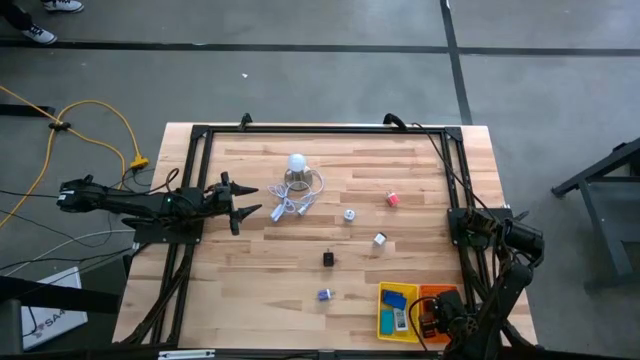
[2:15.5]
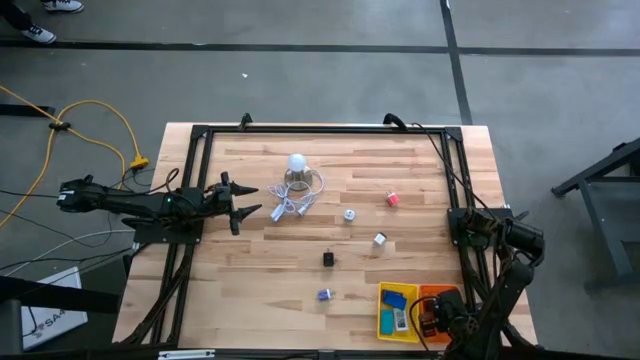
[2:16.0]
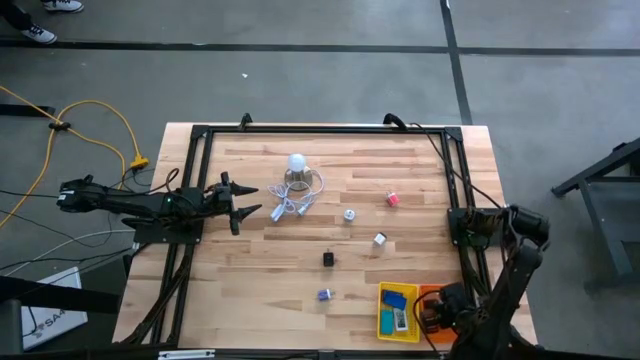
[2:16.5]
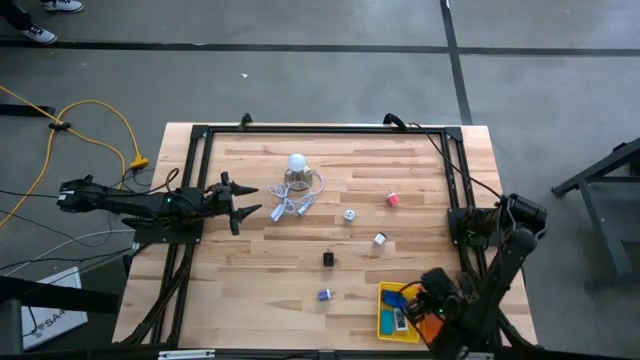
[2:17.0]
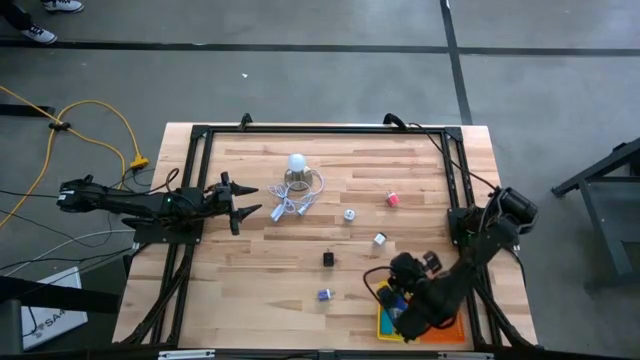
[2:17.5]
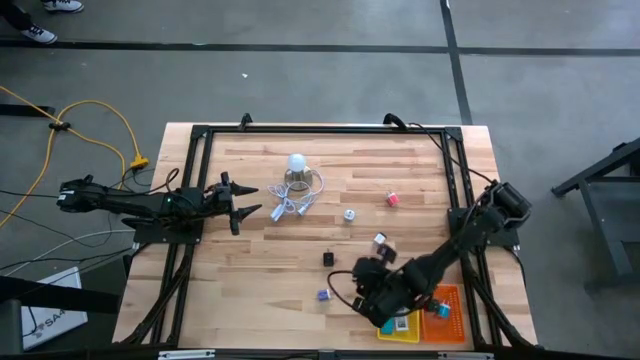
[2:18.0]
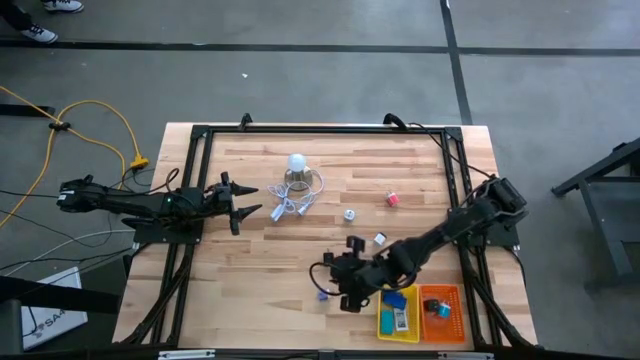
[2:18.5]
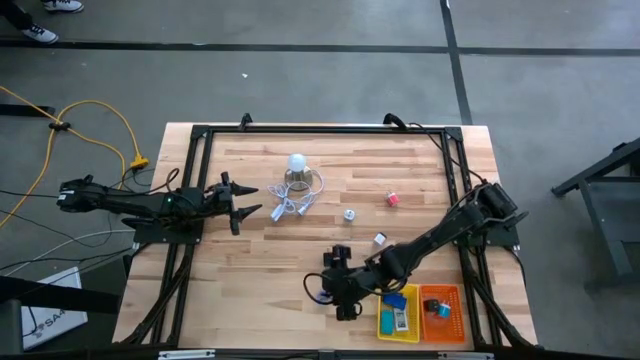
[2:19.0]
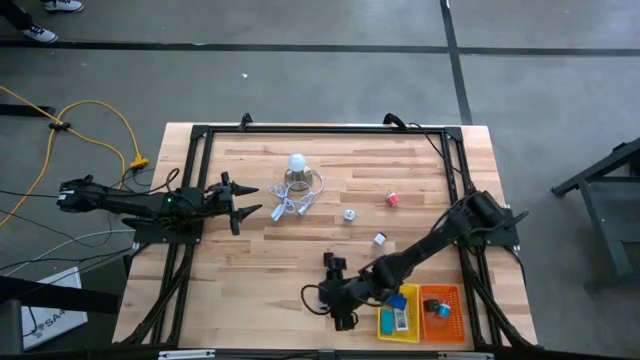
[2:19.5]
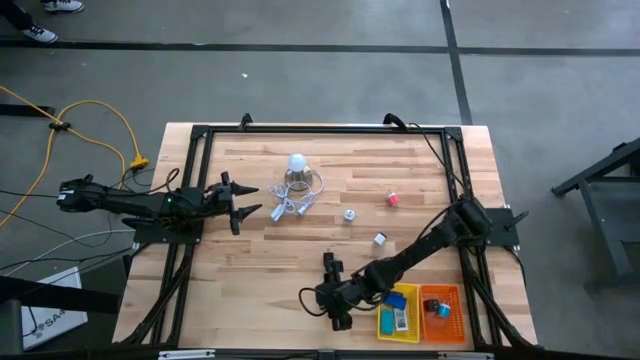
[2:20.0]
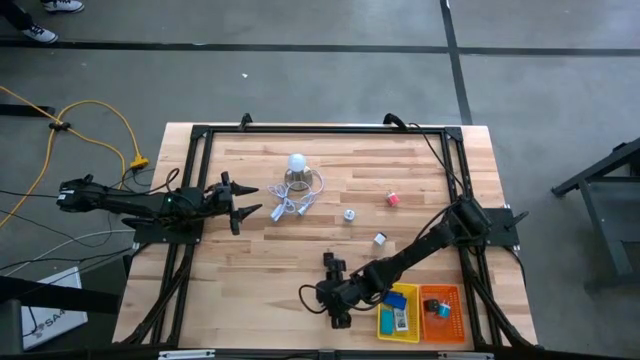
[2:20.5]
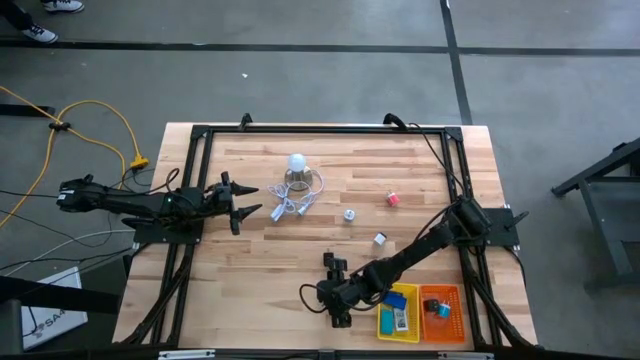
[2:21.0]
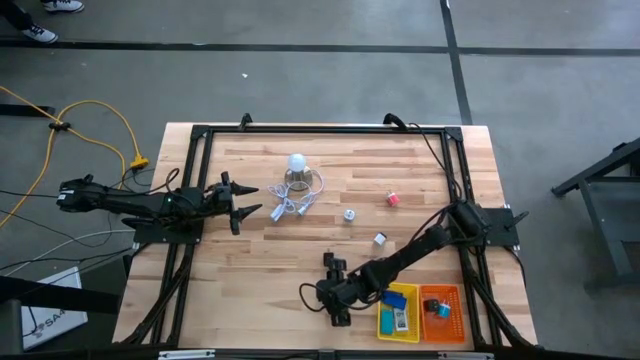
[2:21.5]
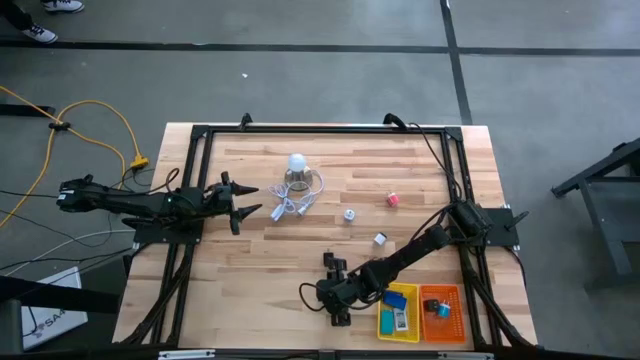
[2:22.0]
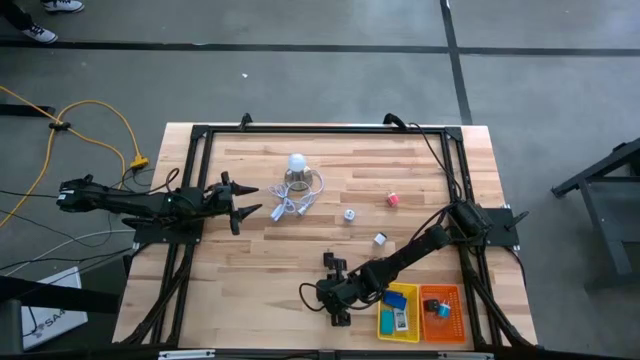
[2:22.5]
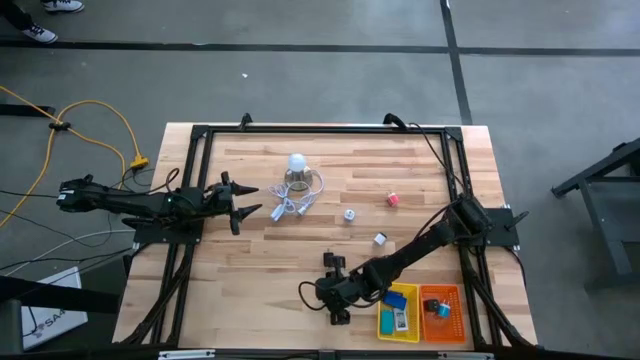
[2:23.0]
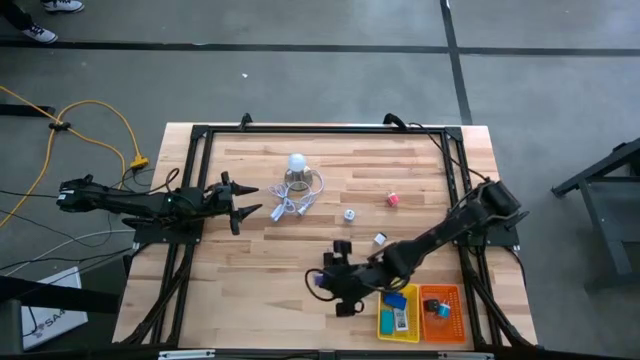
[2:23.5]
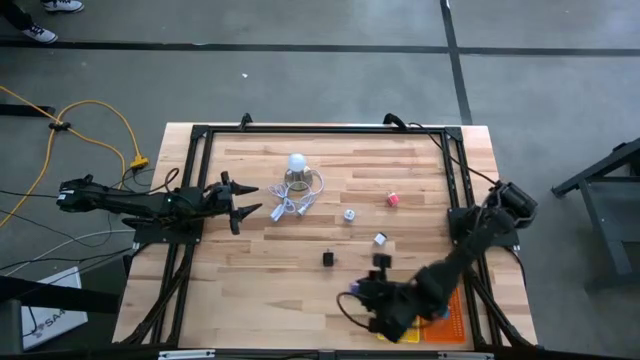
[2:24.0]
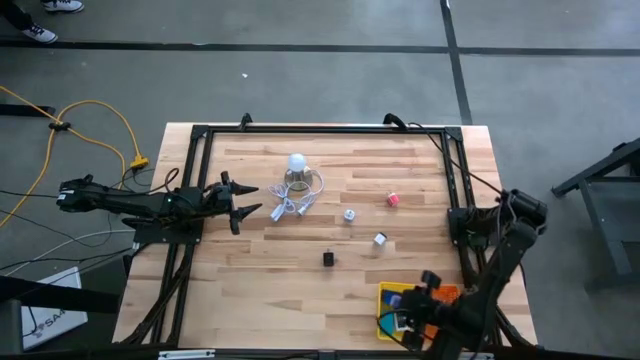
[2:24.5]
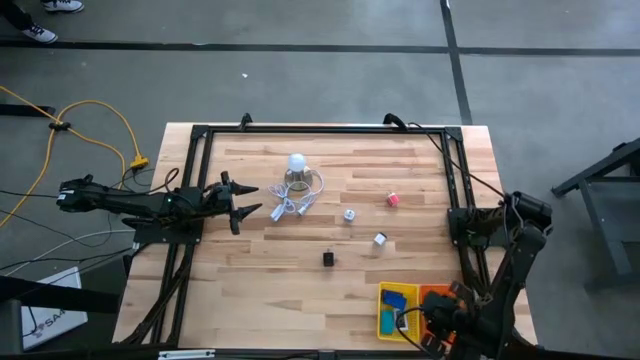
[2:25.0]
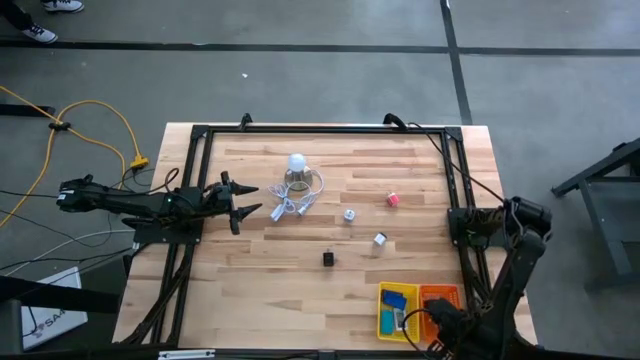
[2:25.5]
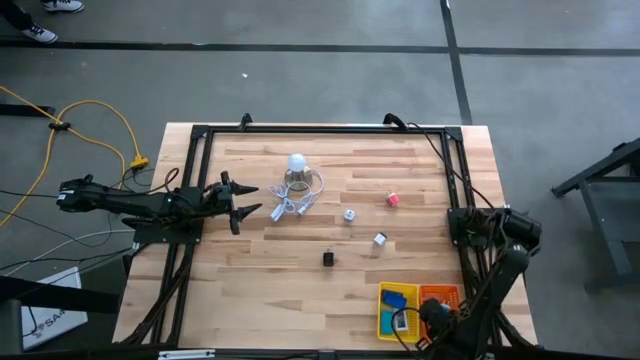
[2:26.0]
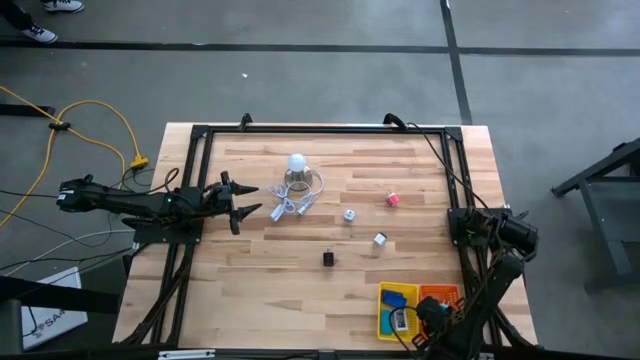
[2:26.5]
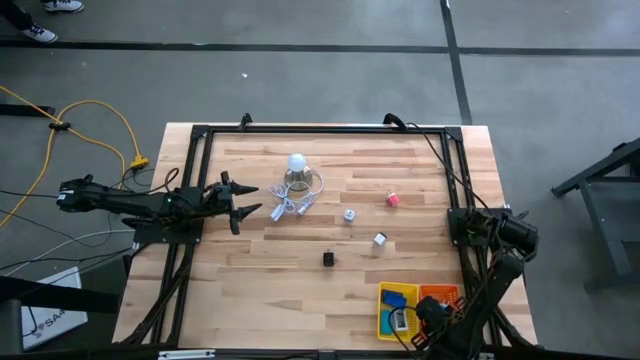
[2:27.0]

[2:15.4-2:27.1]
Task: Pick & Place Office items
Put the violet charger adapter into the orange basket

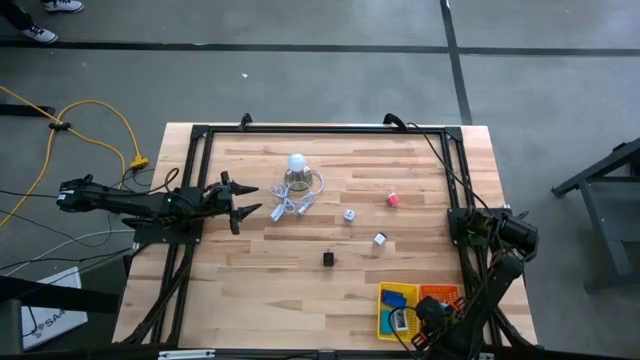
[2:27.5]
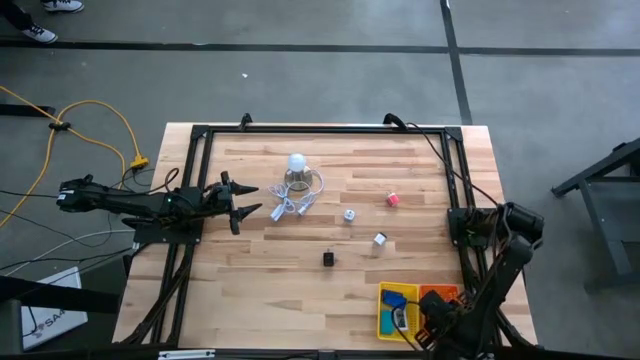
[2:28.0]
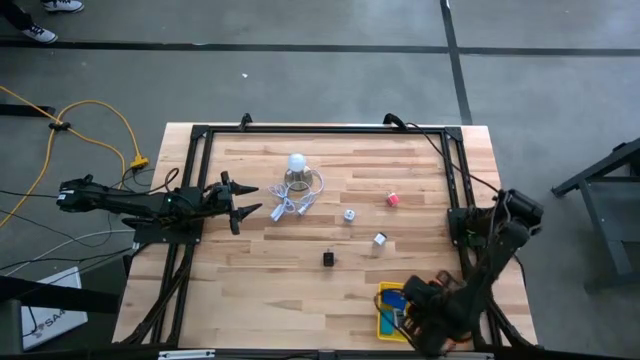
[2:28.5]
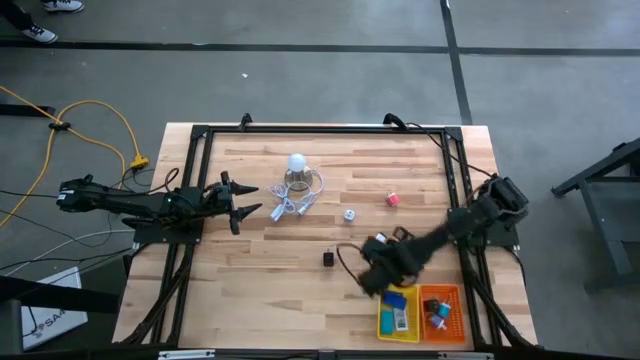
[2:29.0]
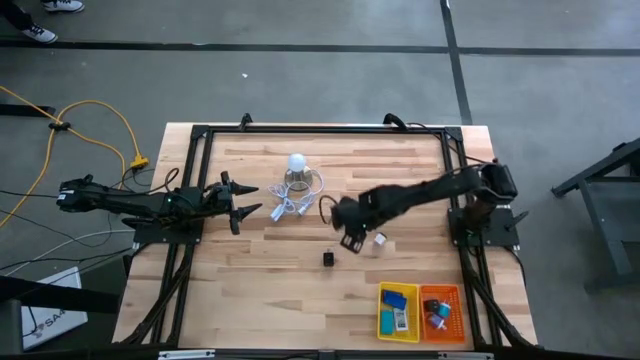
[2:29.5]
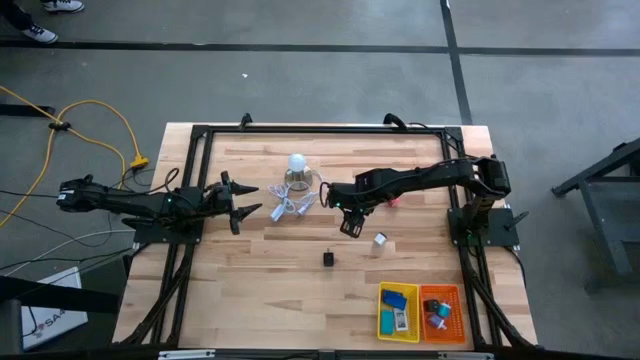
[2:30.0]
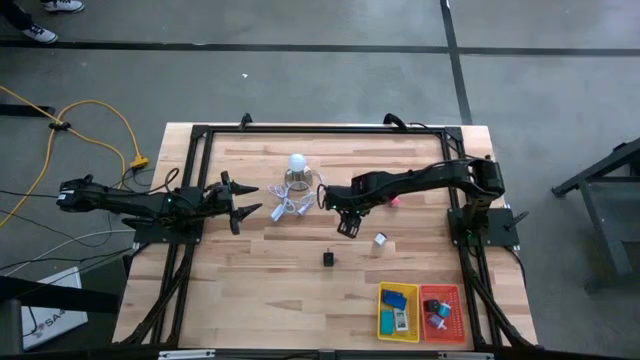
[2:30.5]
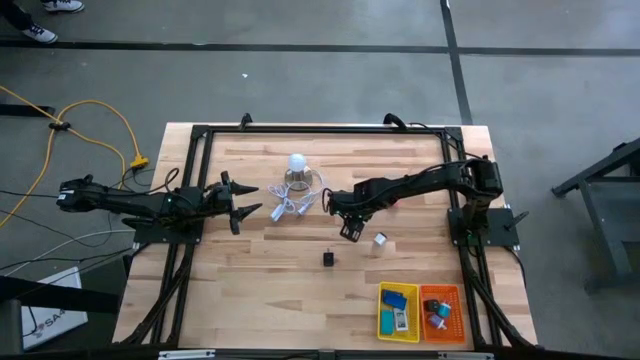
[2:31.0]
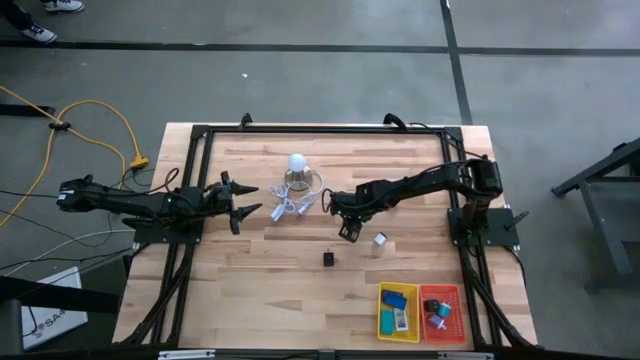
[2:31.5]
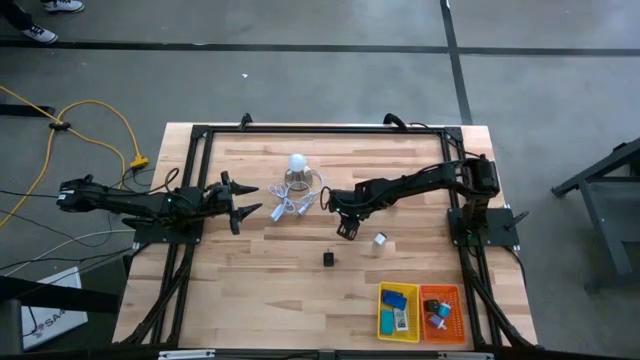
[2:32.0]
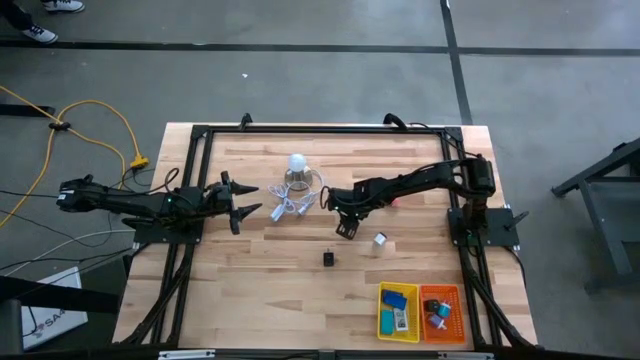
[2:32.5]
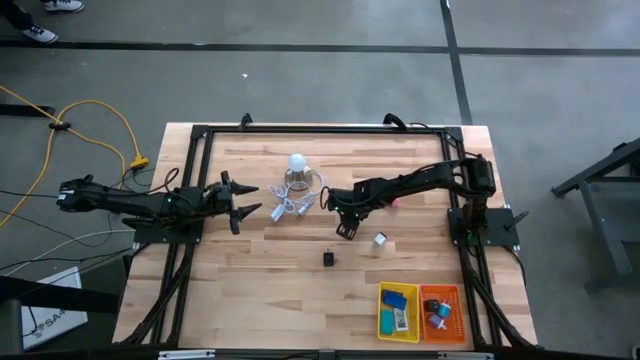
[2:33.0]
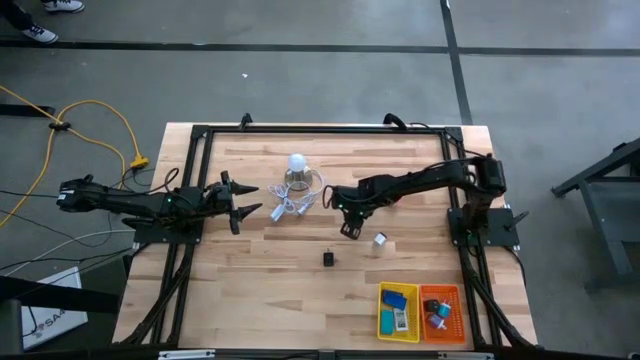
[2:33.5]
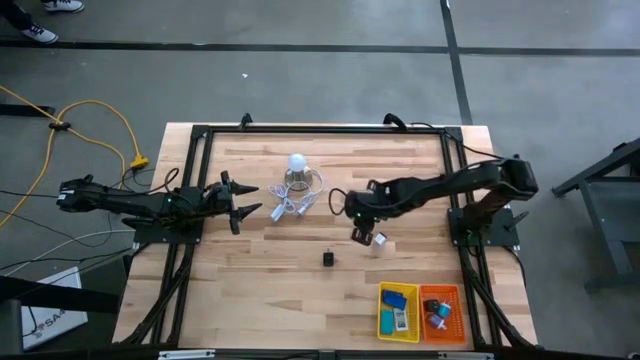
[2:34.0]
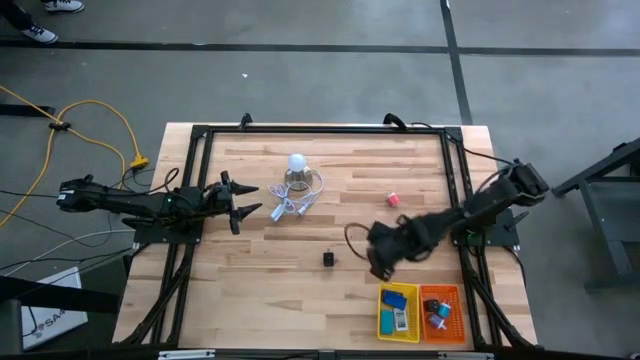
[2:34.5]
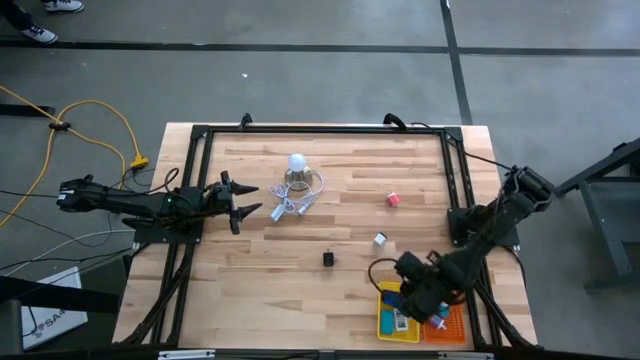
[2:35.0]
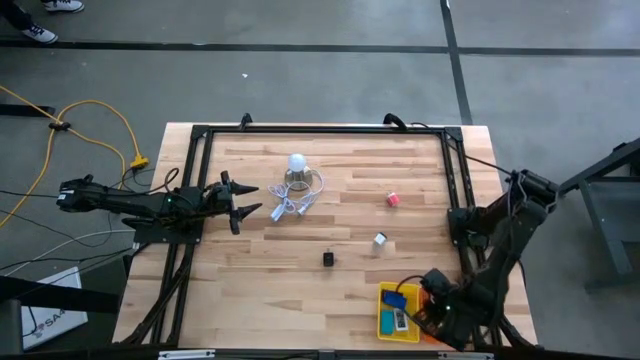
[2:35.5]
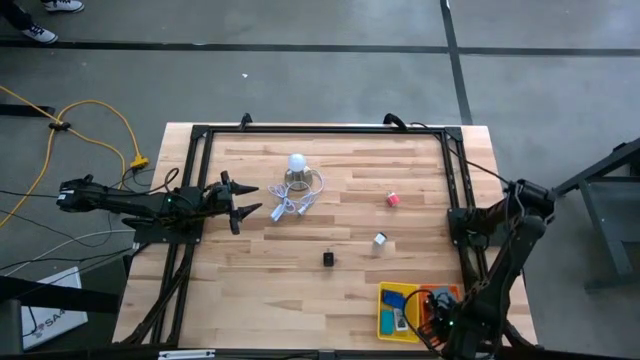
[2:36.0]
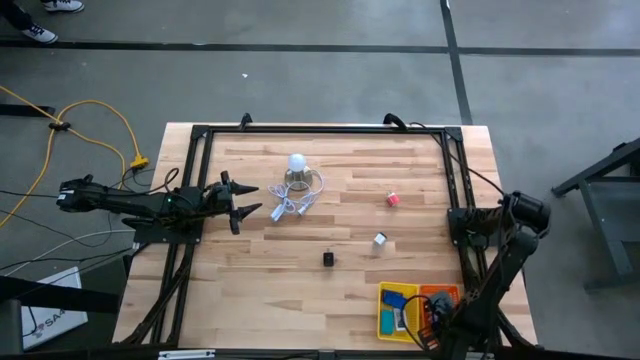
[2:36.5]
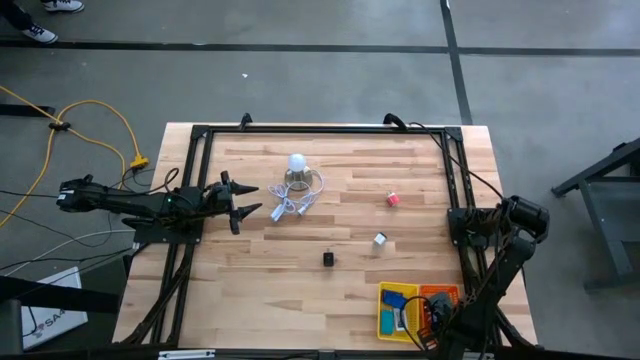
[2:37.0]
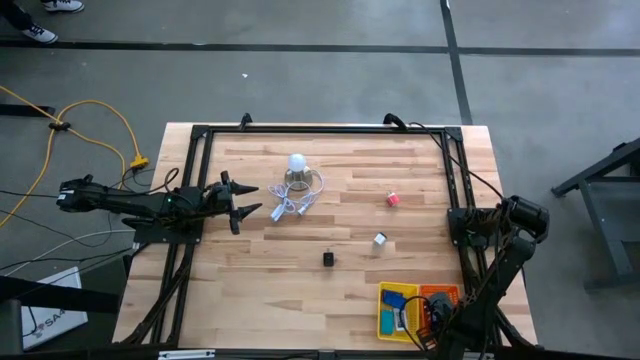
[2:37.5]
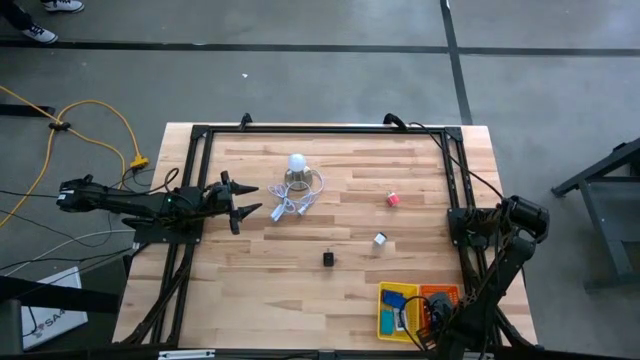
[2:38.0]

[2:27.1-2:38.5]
Put the blue charger adapter into the orange basket
